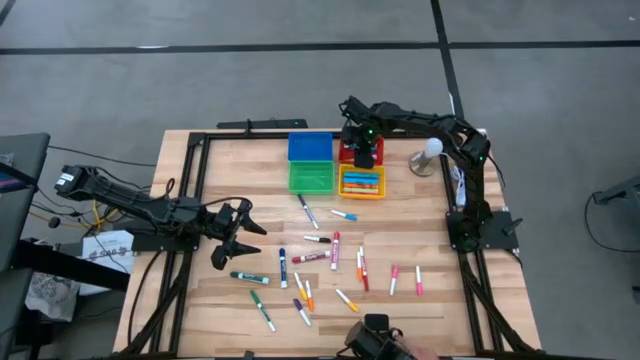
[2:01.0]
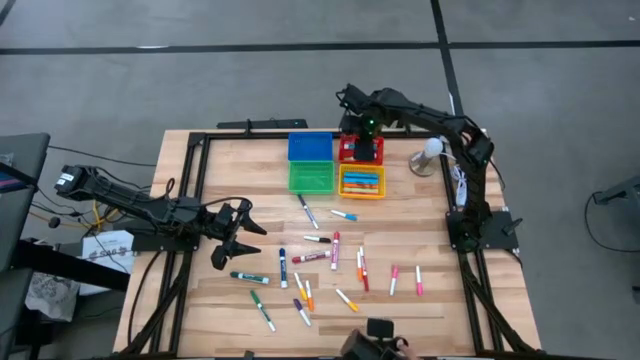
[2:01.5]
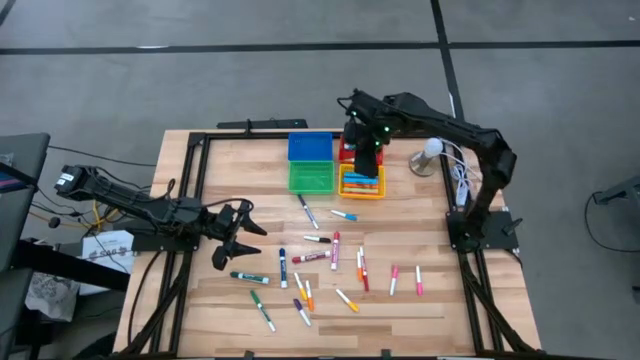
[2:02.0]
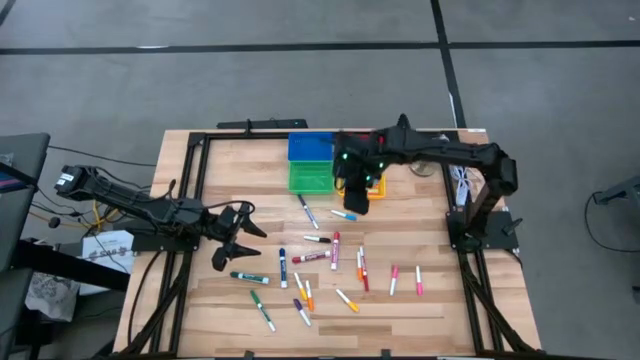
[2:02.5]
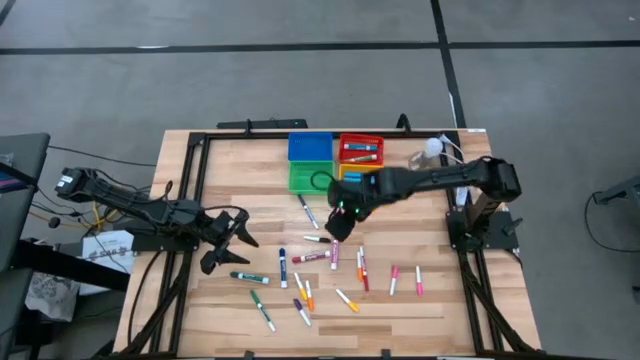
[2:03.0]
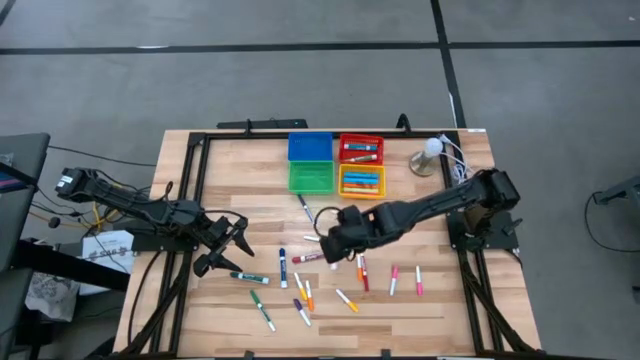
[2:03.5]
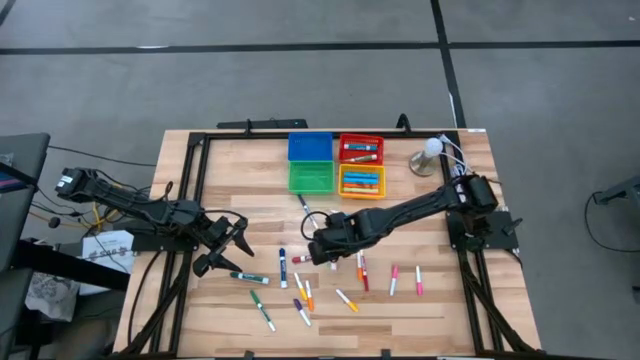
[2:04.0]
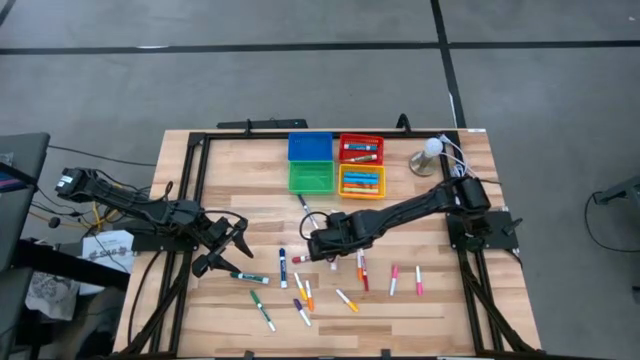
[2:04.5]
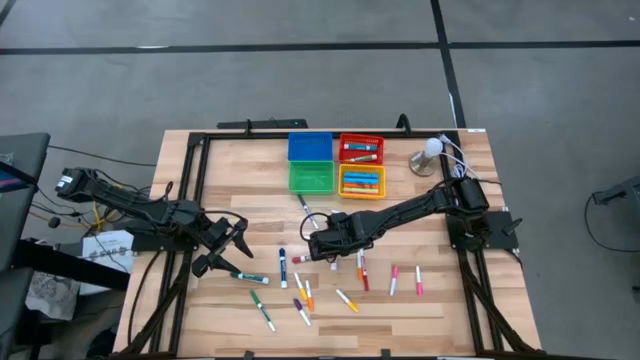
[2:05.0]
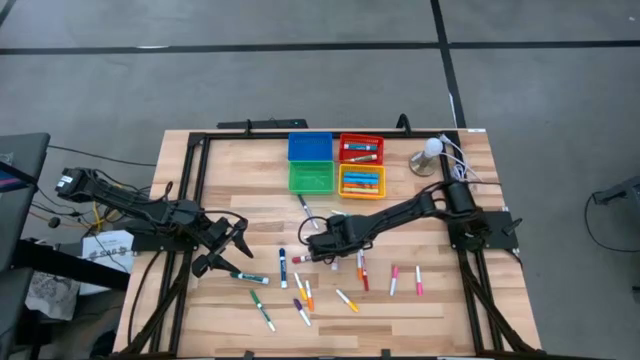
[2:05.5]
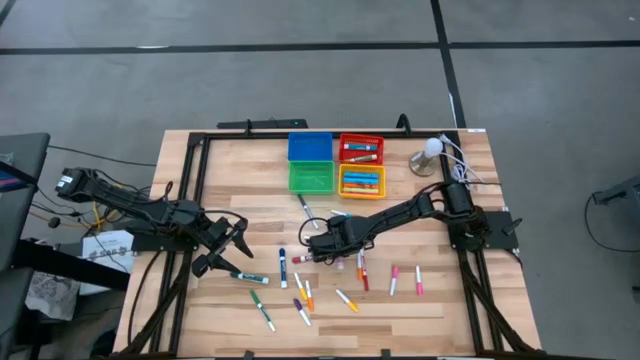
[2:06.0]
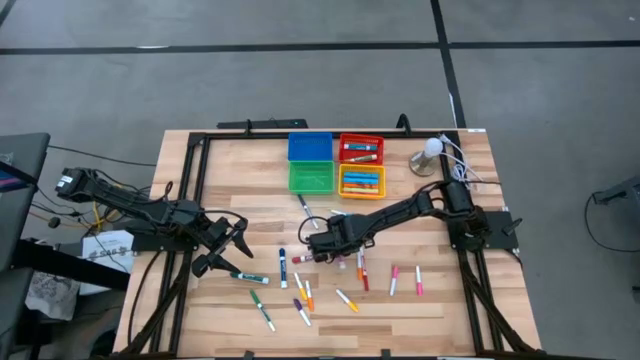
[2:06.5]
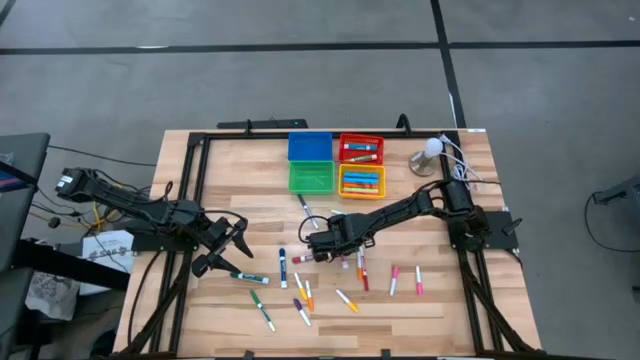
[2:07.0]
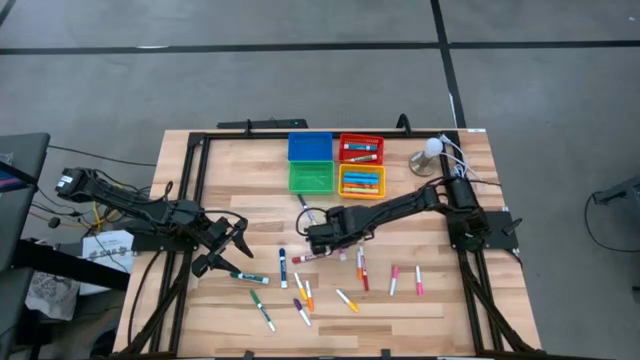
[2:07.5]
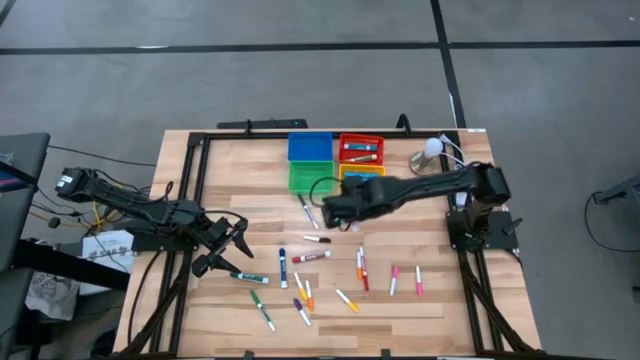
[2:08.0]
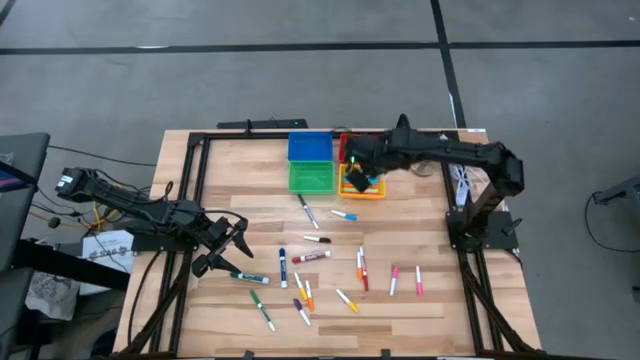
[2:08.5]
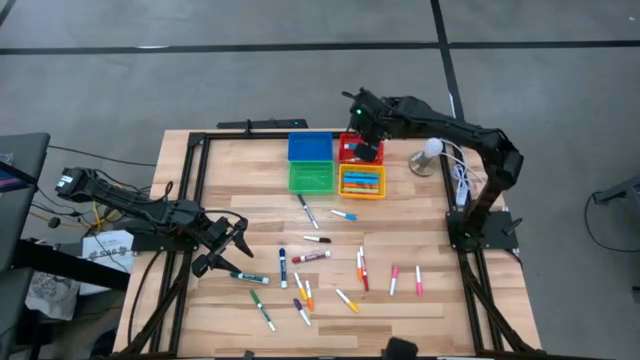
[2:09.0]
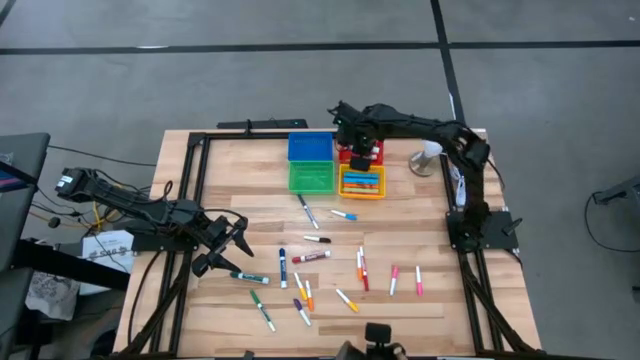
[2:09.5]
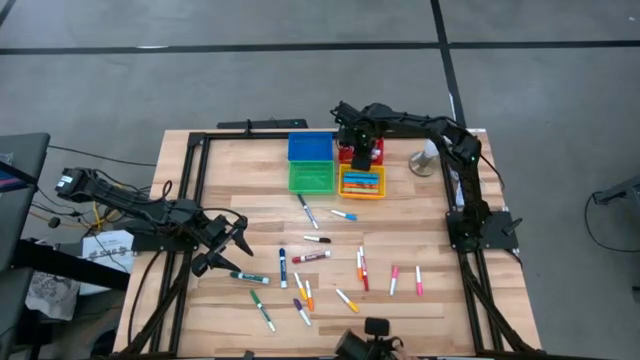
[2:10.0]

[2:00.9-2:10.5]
Task: Pick & Place Markers
Put the pink marker pen into the red bin

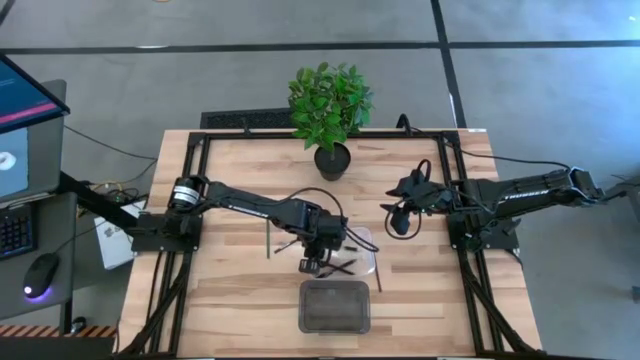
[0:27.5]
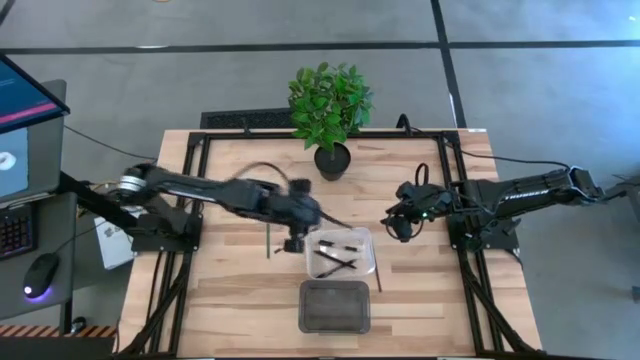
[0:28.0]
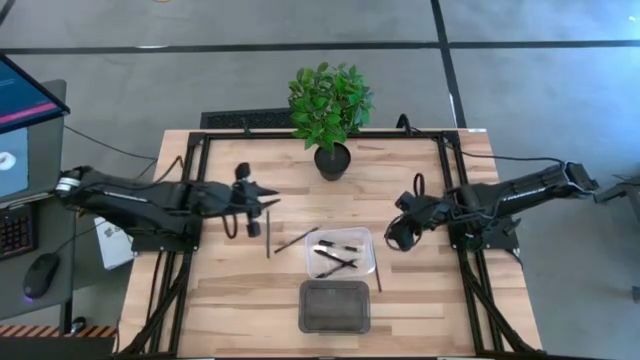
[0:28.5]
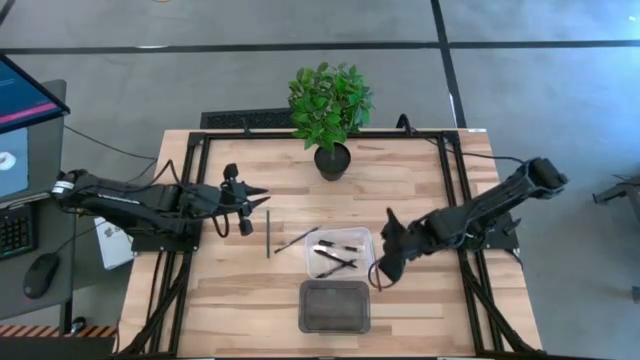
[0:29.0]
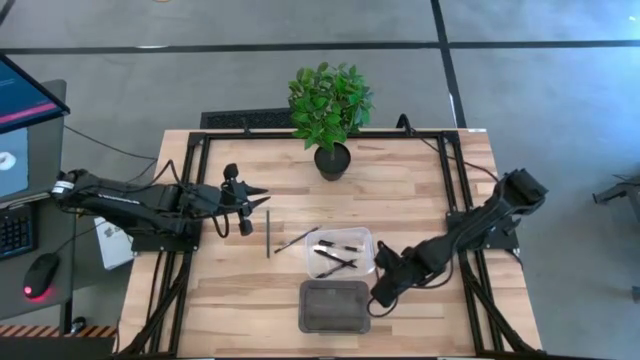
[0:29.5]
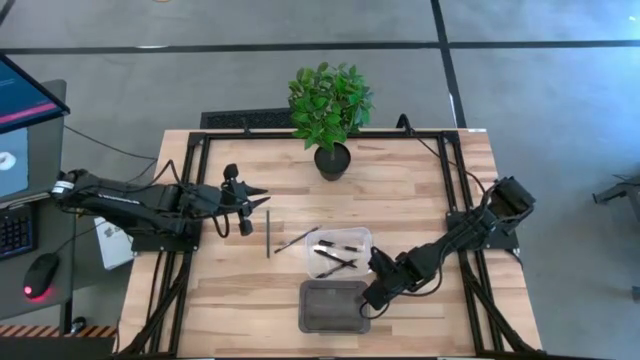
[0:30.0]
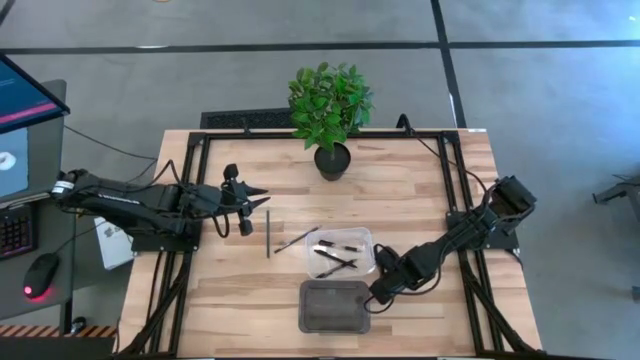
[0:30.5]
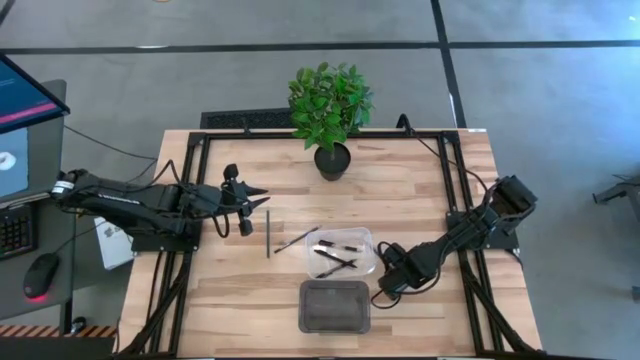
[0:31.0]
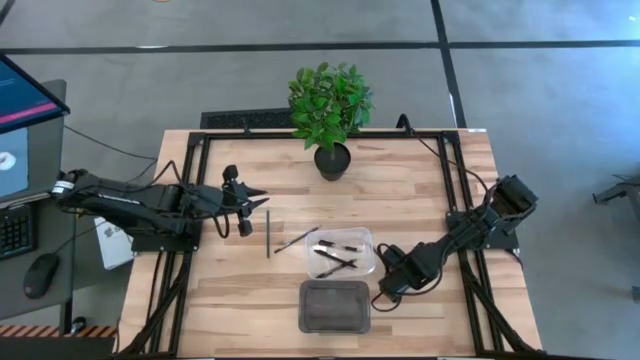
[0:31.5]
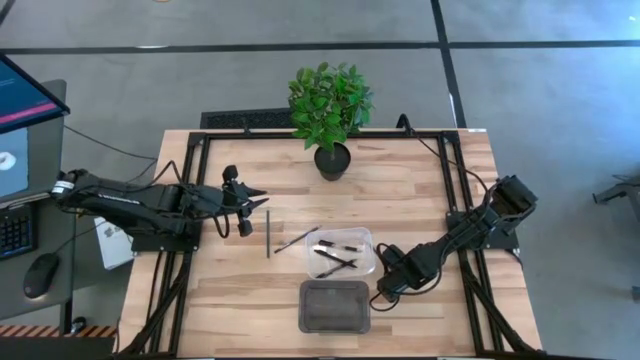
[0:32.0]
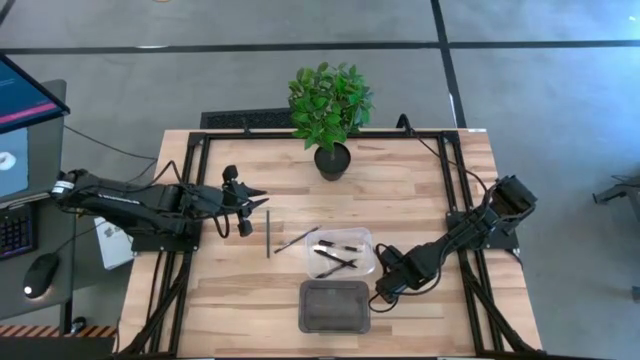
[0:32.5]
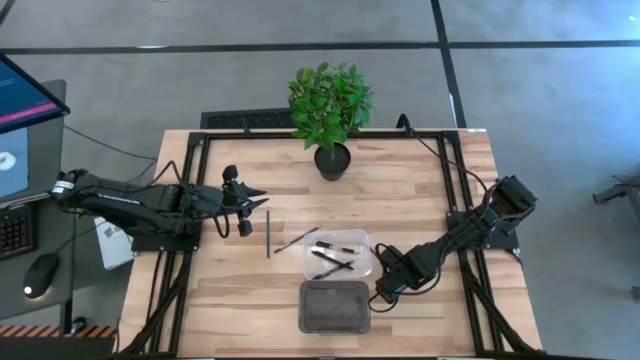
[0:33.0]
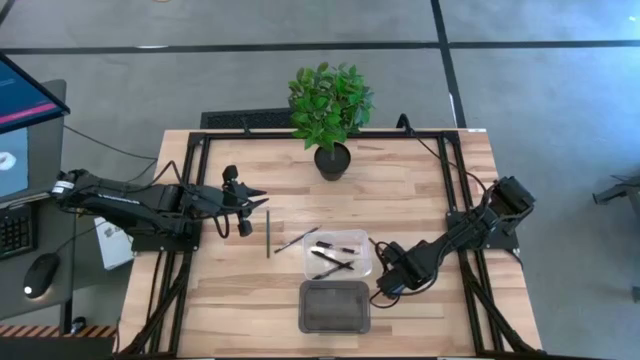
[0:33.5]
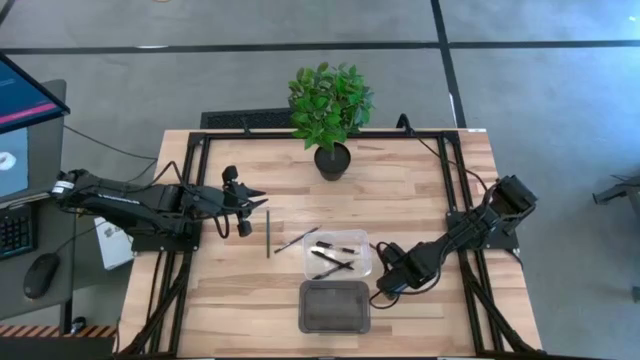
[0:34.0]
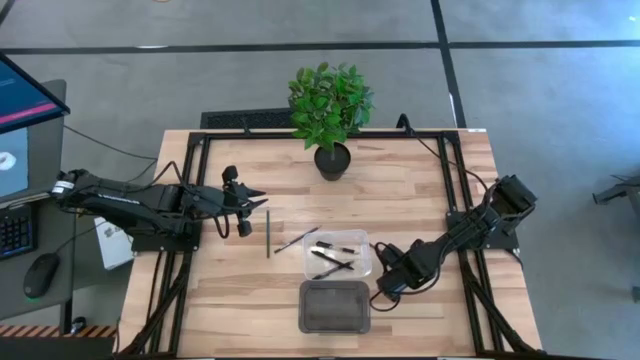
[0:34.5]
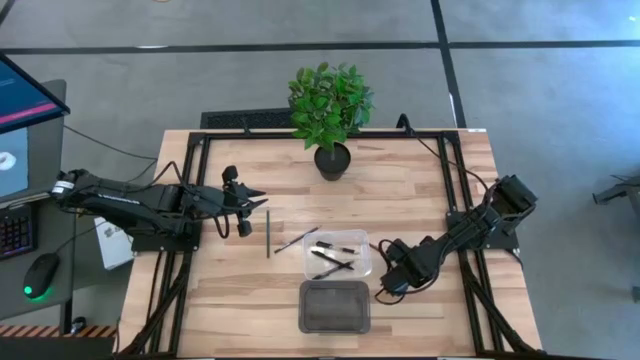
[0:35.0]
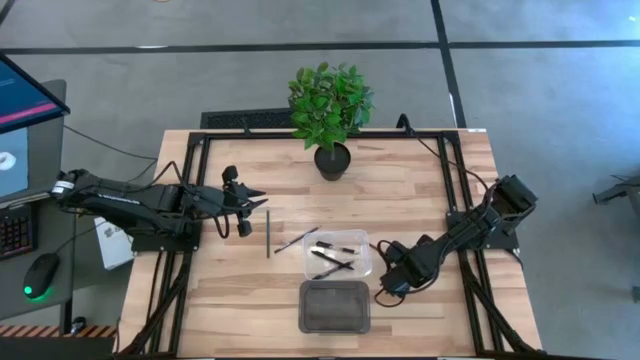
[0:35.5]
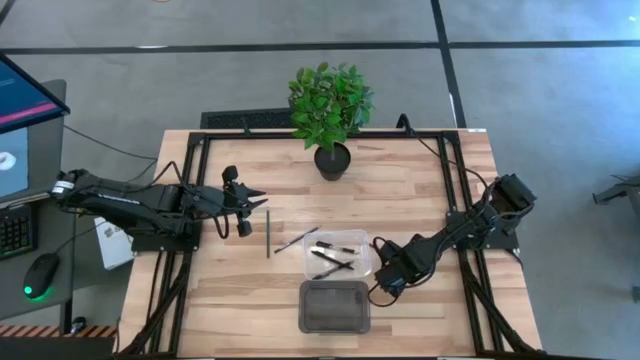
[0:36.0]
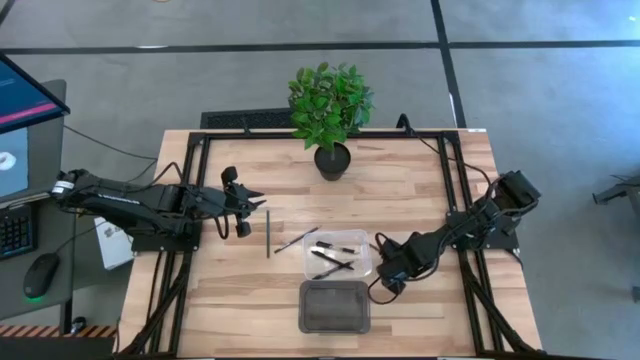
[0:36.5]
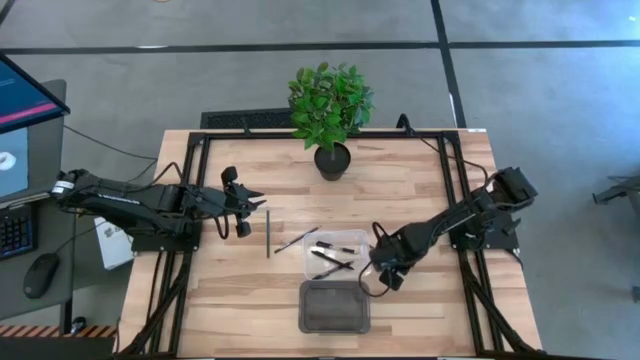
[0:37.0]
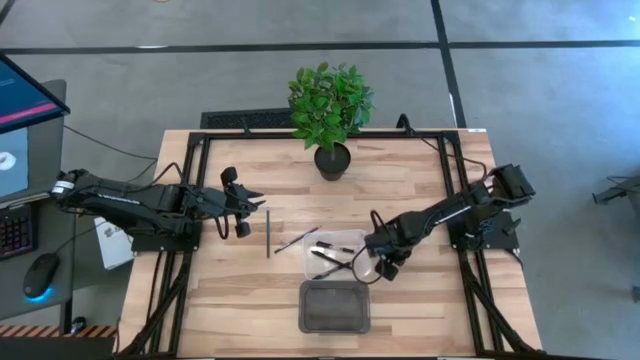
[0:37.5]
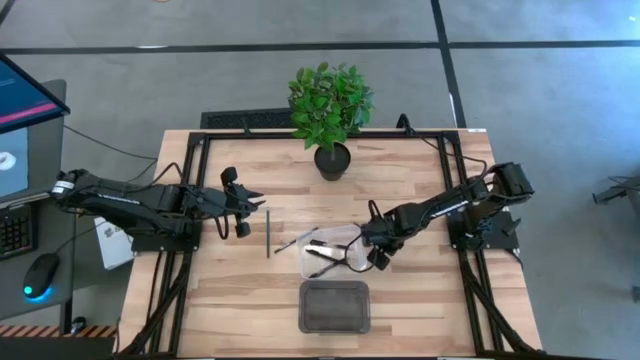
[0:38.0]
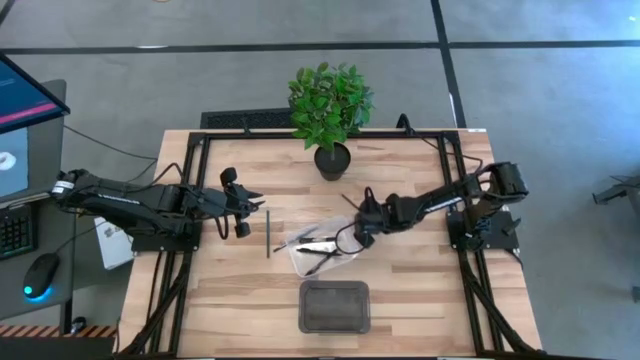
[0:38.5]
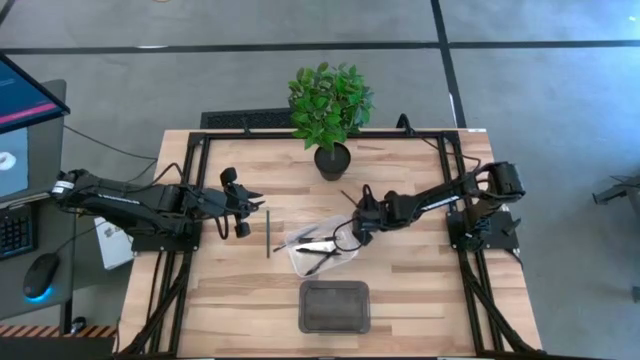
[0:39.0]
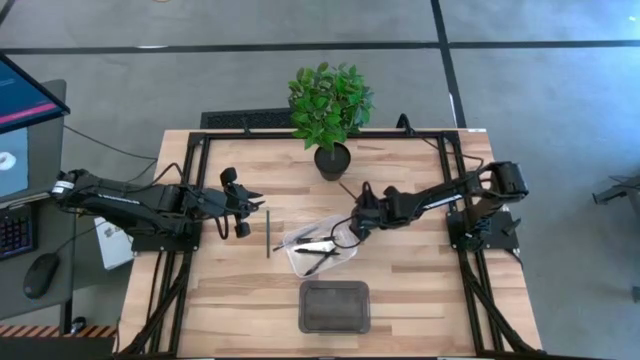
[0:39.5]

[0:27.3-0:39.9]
Task: Sort pens & pencils
Put the brown pencil into the black bin
